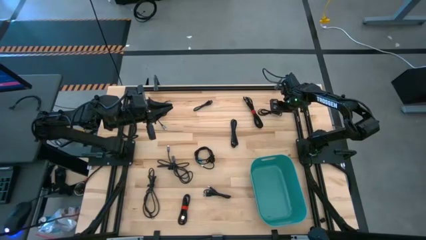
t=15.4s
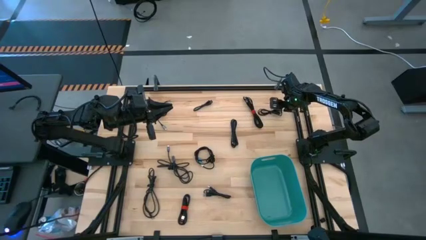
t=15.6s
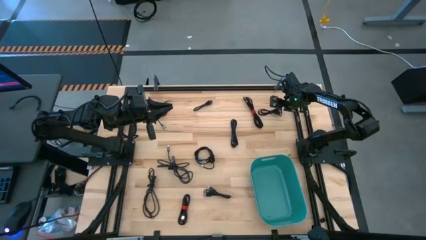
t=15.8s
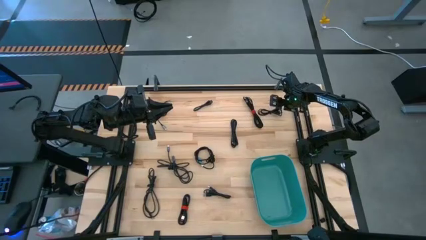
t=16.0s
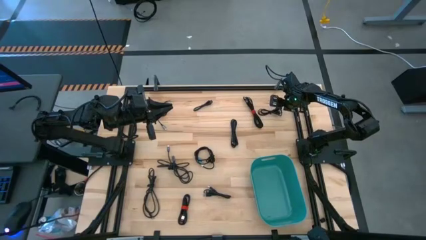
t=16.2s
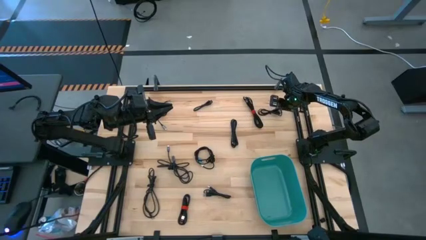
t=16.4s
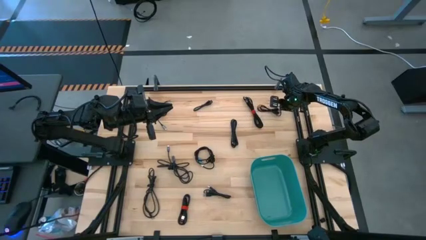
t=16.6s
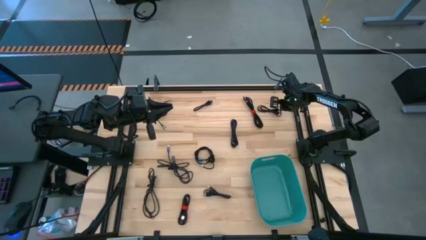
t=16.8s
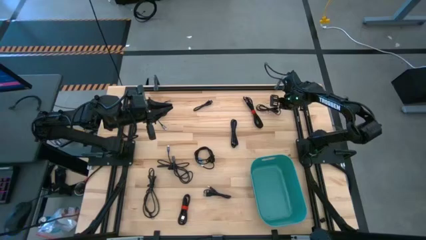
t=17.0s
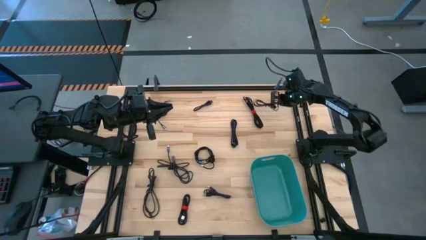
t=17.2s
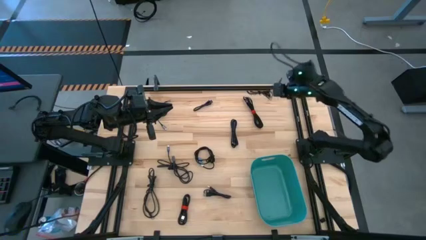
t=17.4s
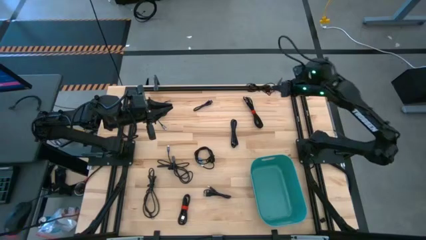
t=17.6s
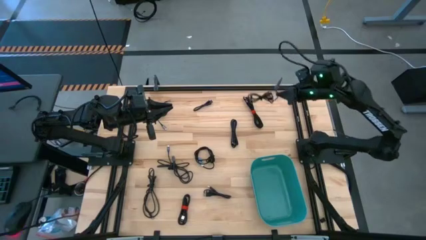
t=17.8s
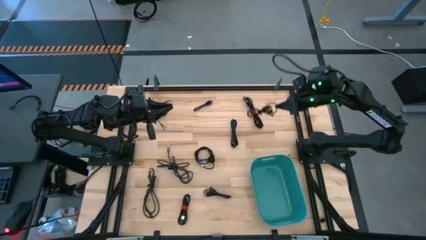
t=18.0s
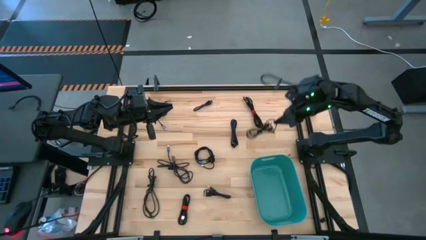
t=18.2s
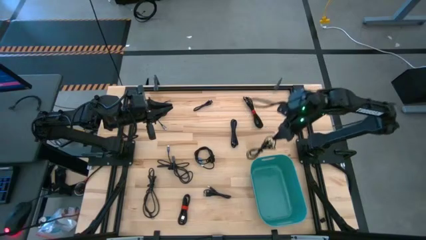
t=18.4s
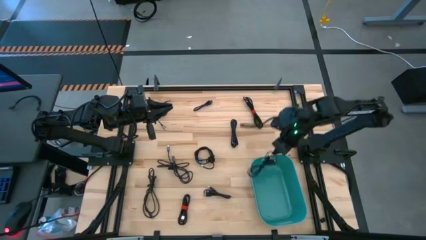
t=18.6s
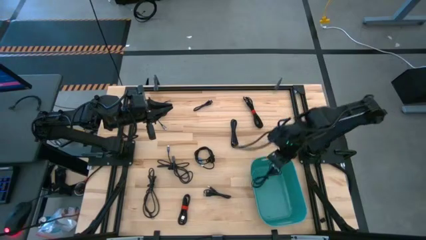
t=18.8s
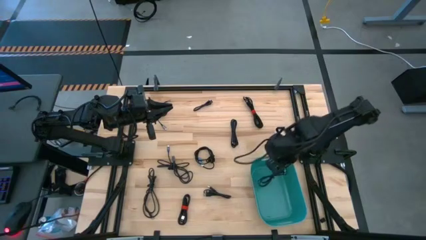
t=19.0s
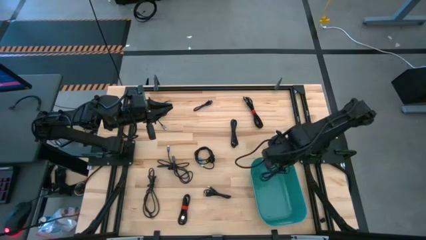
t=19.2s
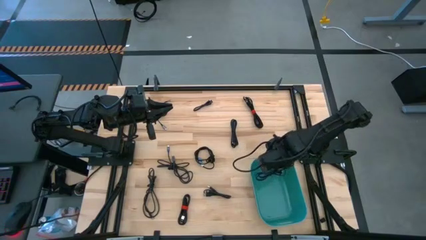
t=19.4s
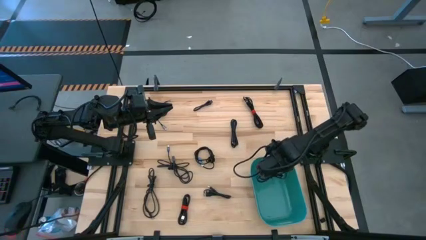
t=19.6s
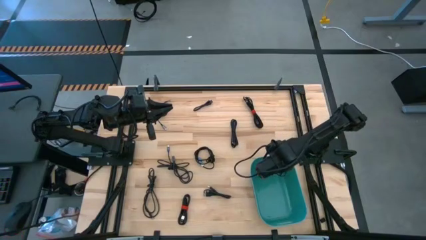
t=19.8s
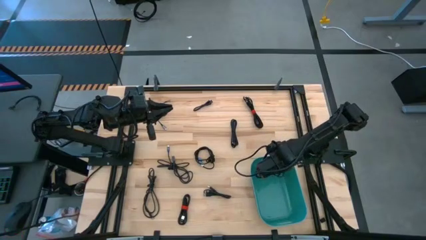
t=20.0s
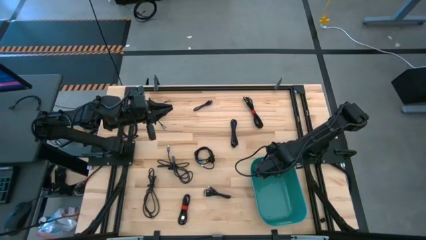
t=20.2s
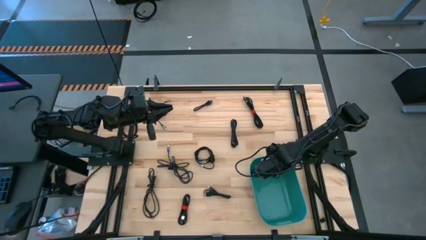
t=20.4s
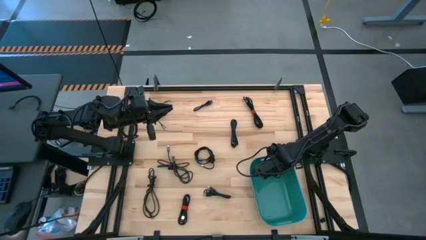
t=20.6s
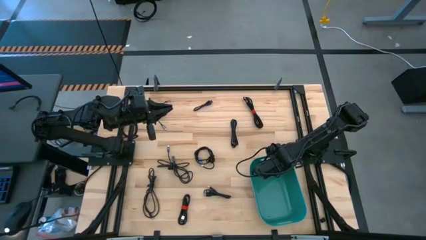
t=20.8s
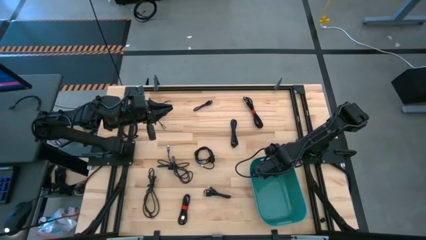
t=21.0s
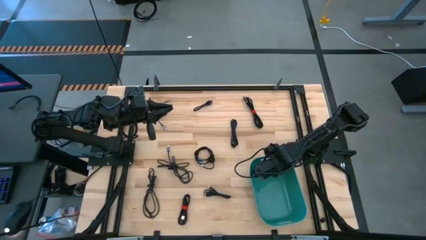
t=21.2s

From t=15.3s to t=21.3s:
Task: Pick and place USB-C Cables
Put the black charger cable into the green bin

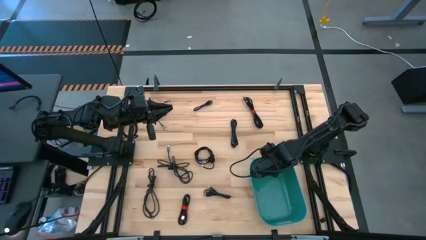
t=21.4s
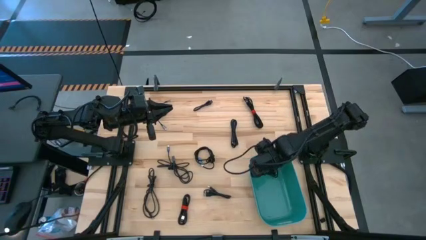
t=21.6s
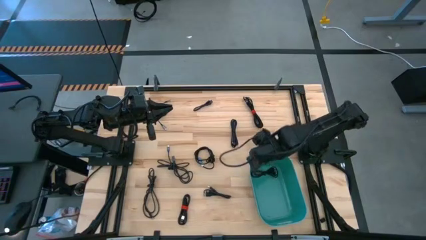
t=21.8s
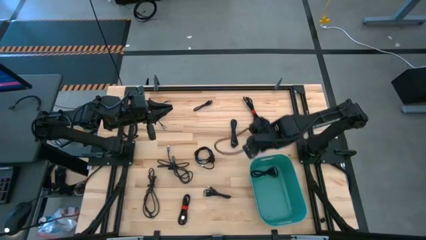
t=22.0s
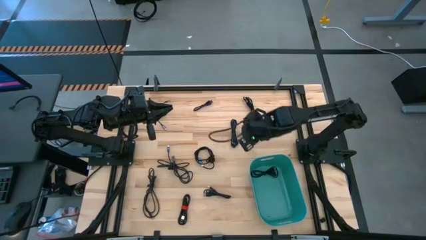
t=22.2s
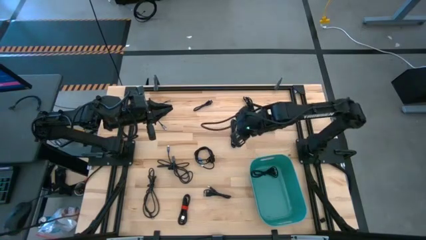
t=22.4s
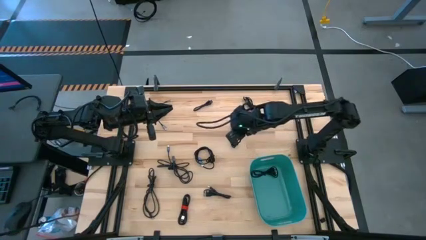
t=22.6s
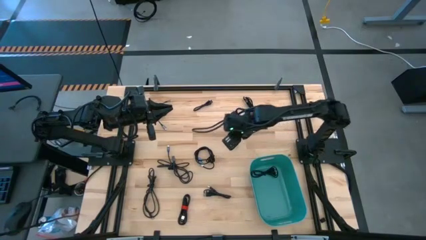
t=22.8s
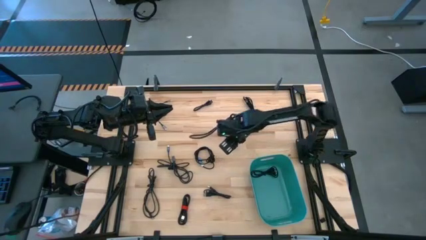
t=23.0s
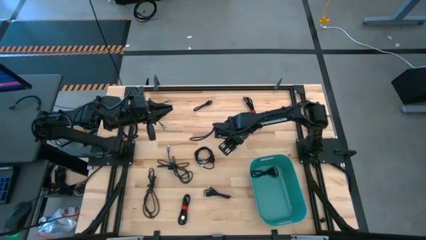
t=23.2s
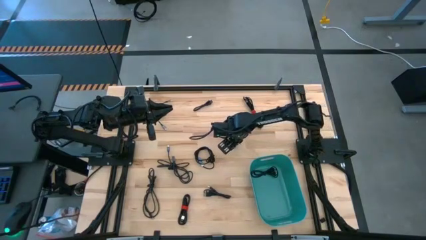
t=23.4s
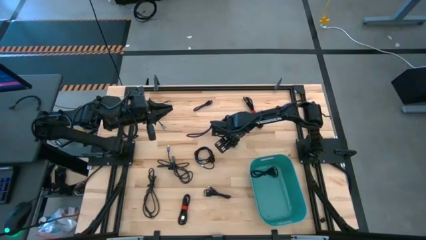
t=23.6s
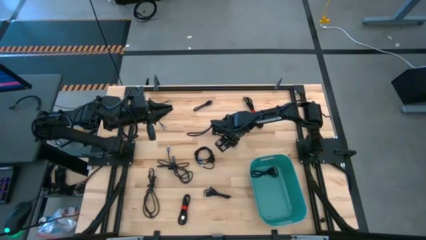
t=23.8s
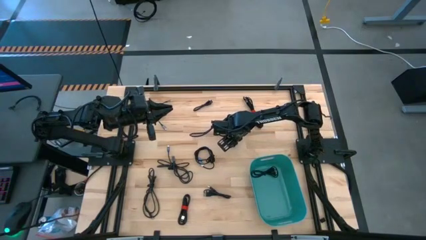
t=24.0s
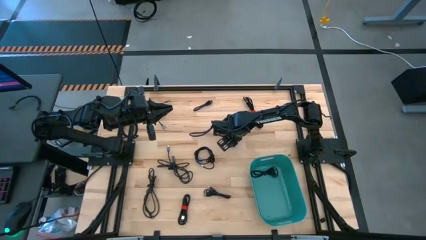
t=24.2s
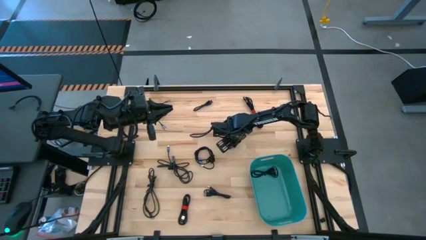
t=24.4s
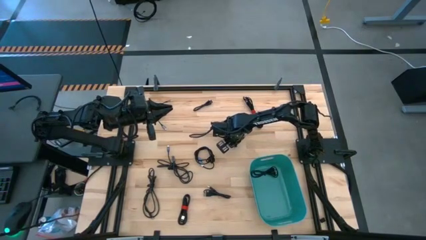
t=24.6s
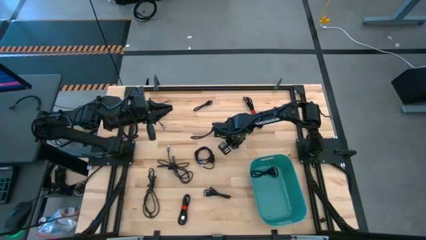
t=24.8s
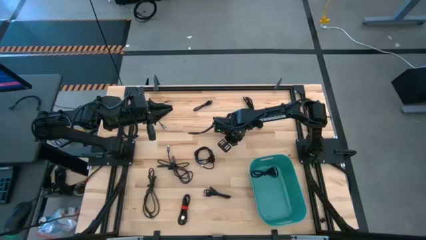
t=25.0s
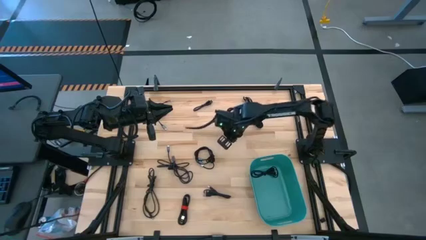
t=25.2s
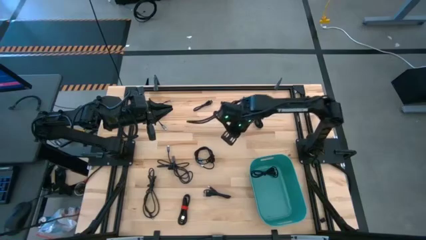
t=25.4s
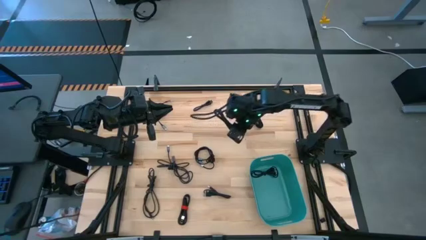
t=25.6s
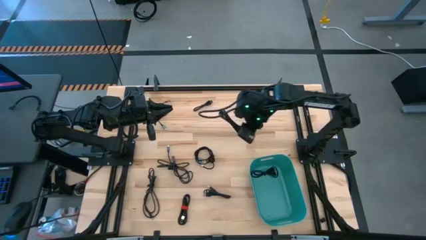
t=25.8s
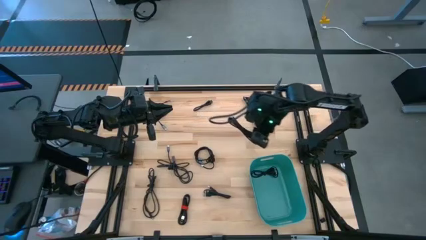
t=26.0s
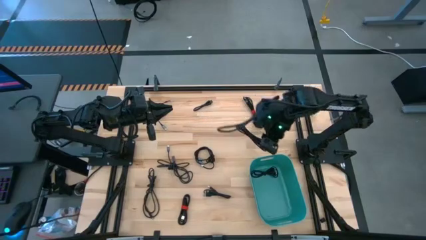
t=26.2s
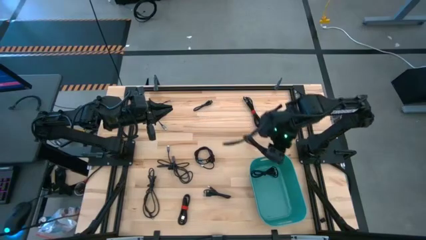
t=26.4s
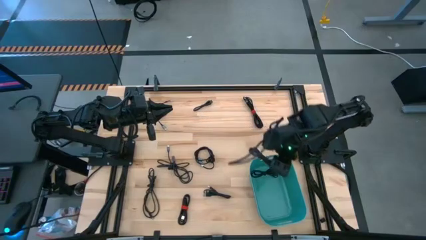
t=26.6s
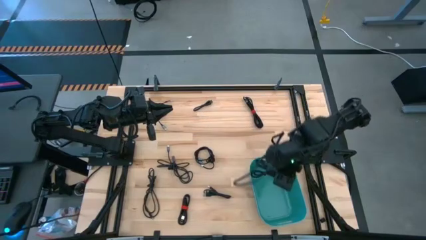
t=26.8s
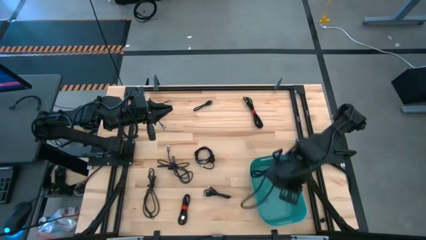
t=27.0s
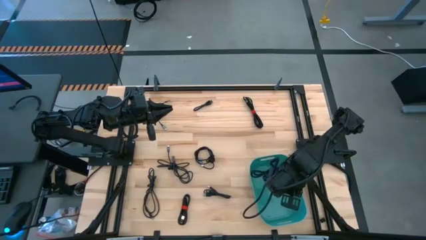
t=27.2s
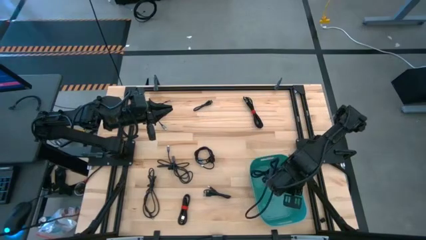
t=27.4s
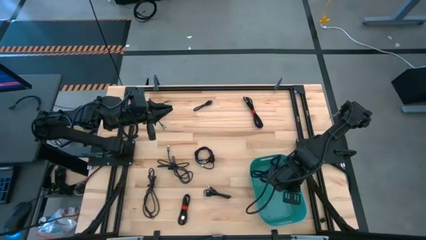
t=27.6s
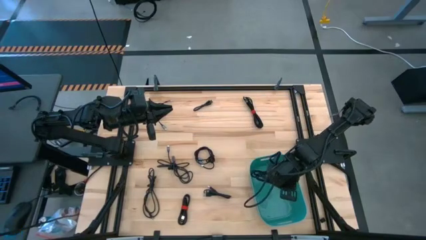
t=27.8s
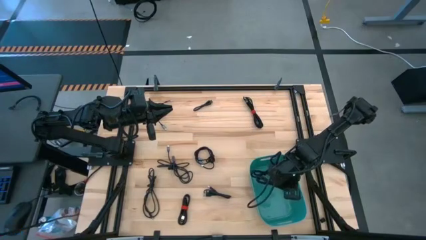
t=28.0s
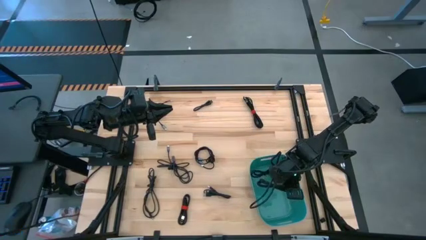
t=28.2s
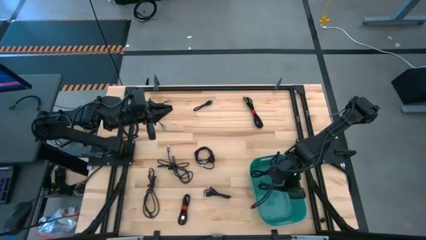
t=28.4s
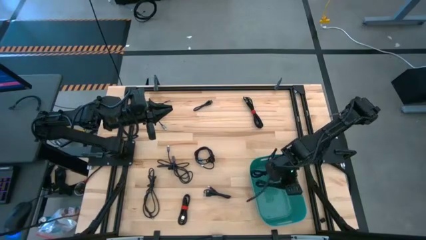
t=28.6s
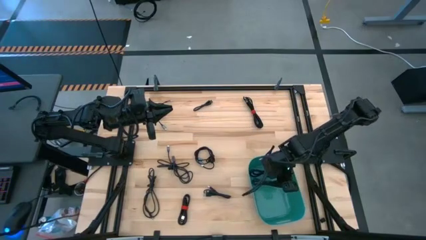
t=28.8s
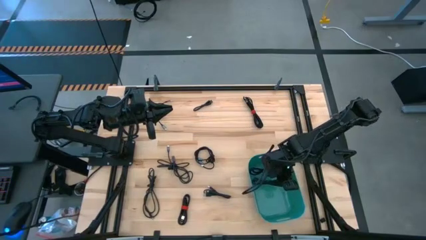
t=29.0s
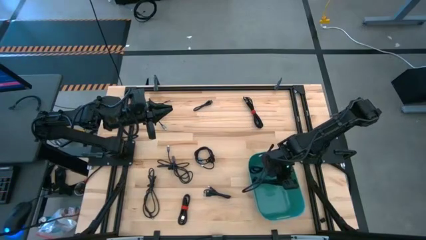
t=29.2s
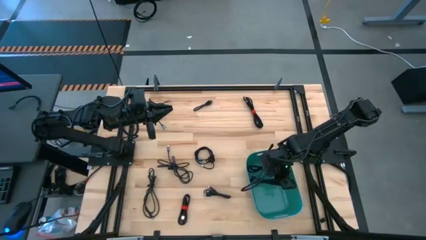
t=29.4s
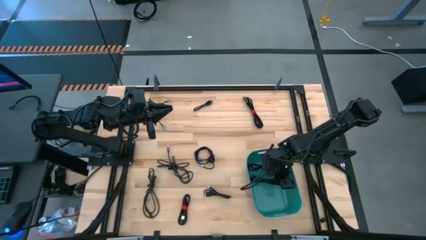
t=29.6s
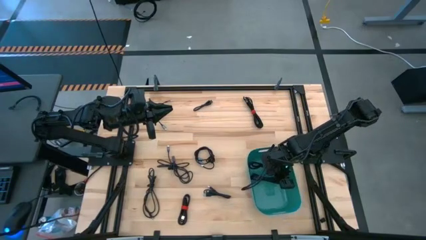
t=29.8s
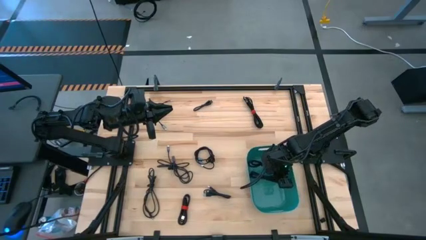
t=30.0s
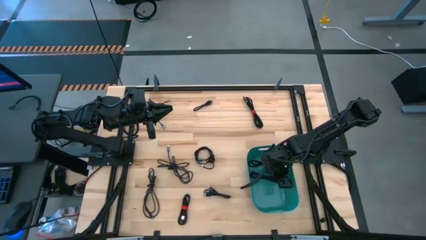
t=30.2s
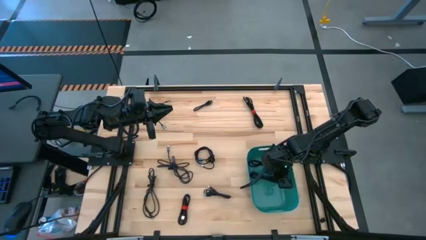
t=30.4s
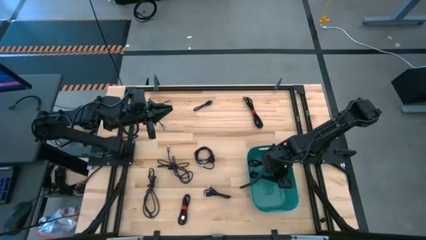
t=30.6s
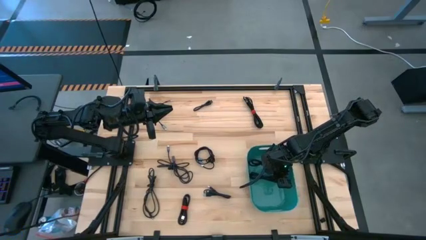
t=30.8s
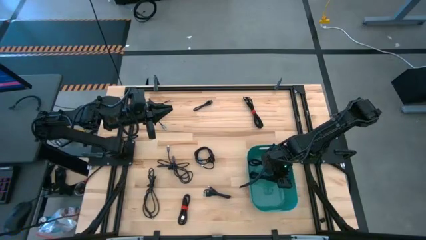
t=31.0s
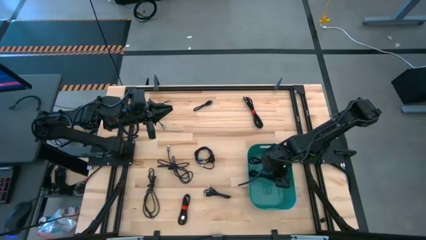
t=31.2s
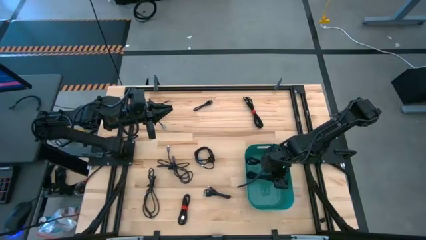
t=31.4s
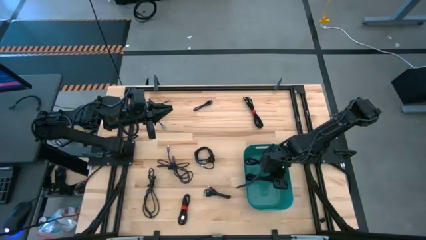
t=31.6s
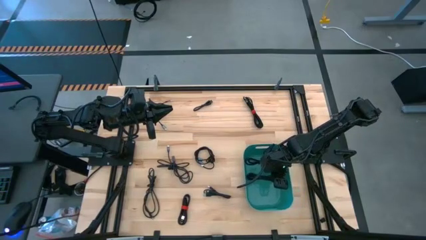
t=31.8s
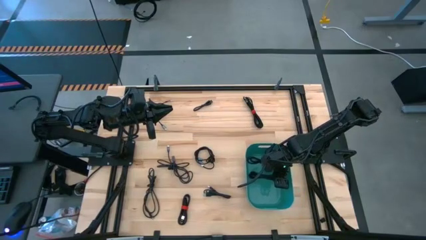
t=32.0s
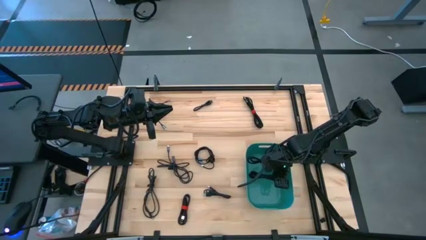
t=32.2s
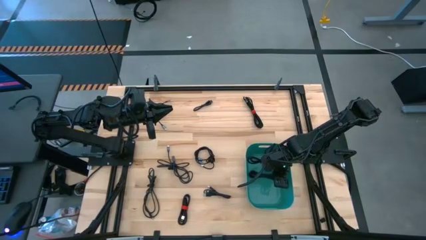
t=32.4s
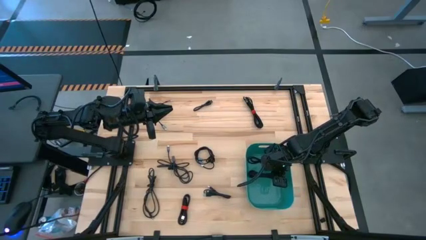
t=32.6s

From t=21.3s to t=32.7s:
Put the black charger cable into the green bin
